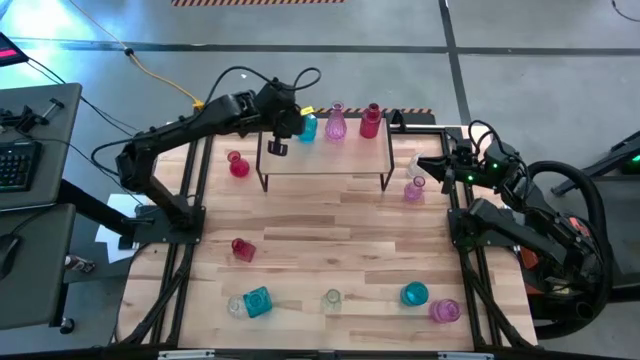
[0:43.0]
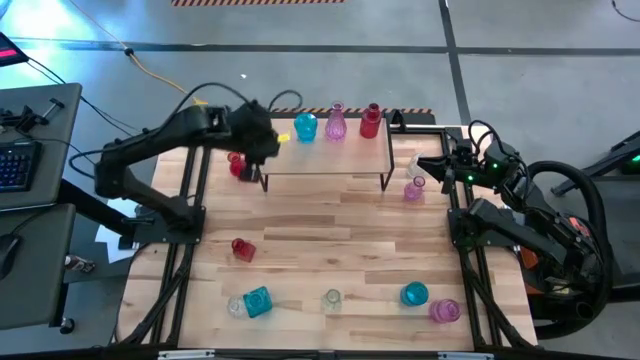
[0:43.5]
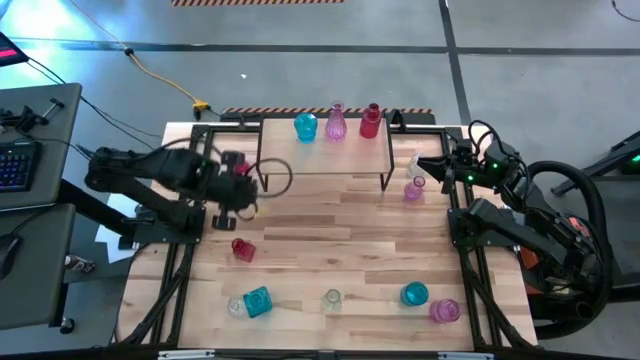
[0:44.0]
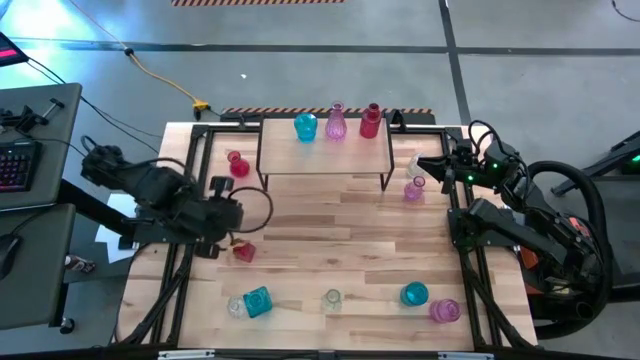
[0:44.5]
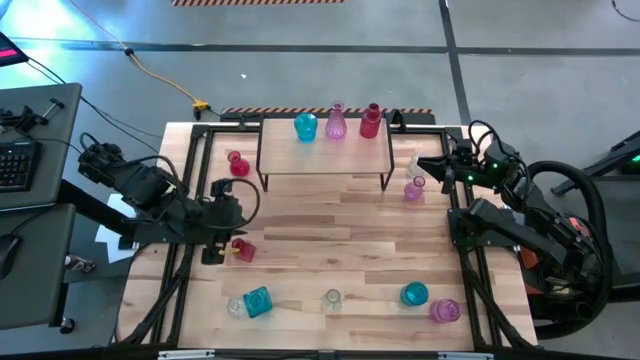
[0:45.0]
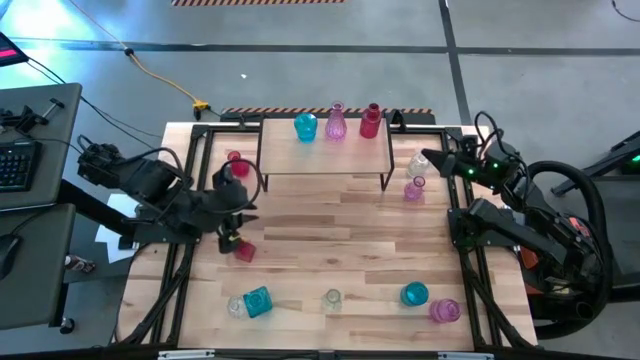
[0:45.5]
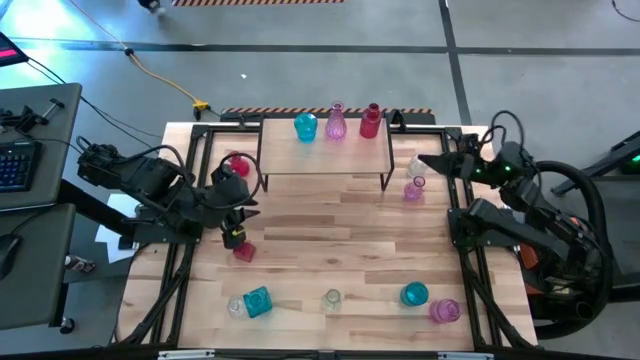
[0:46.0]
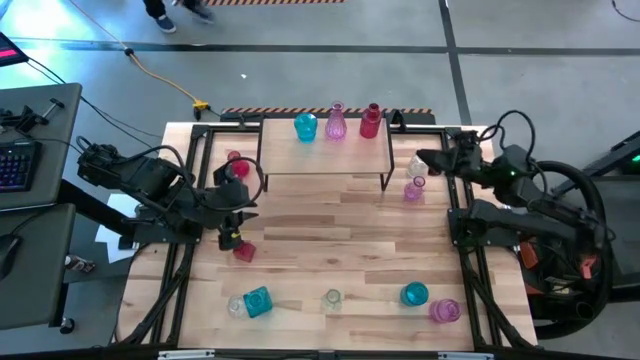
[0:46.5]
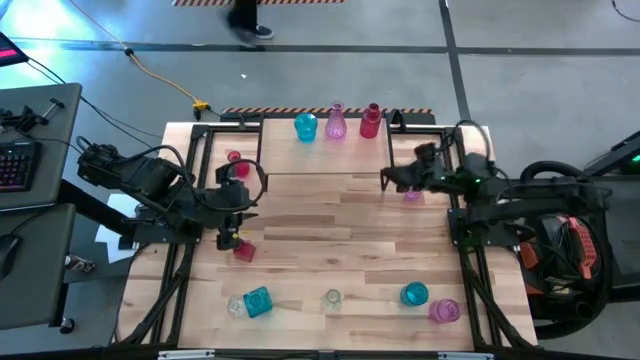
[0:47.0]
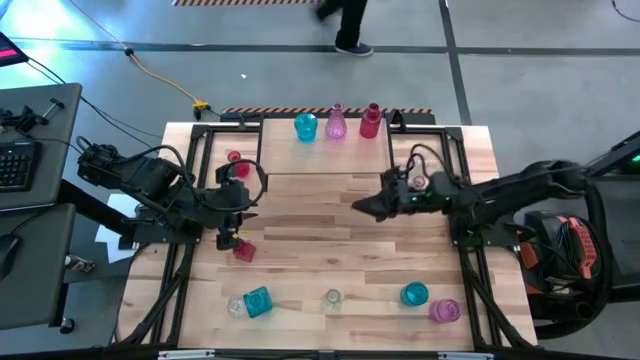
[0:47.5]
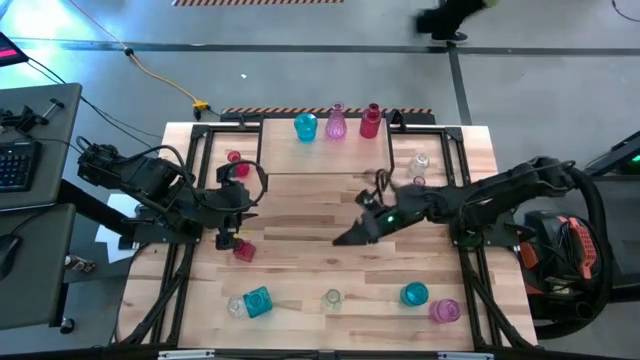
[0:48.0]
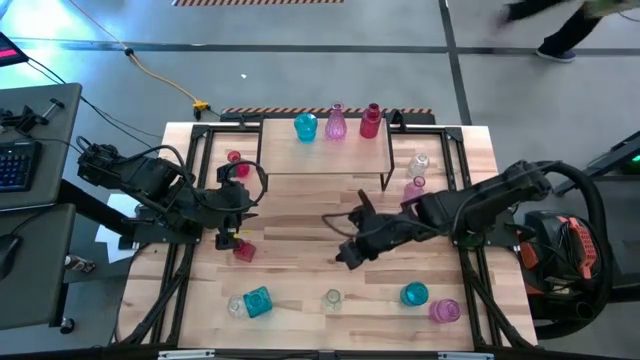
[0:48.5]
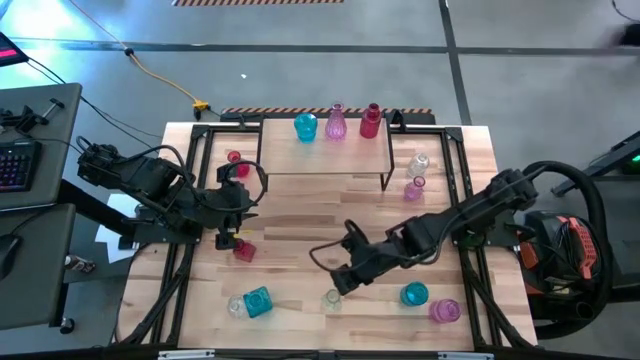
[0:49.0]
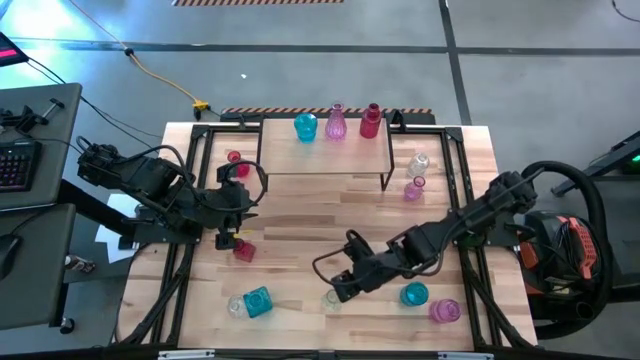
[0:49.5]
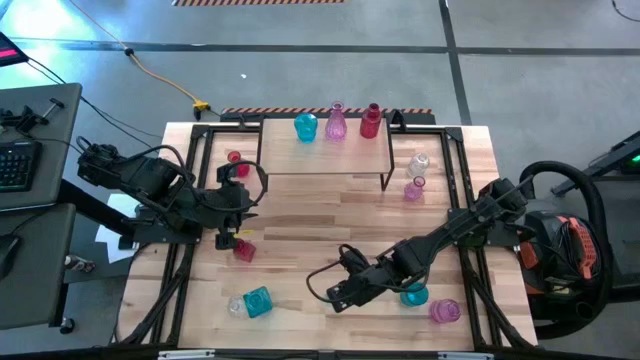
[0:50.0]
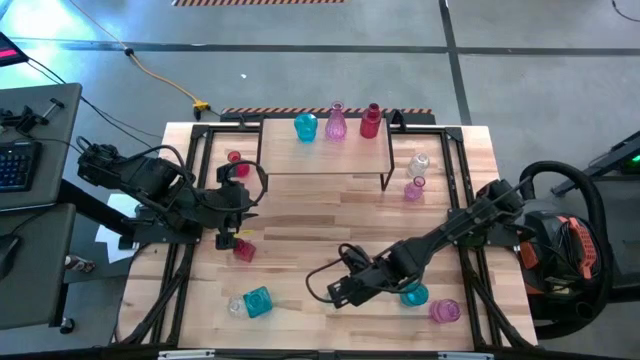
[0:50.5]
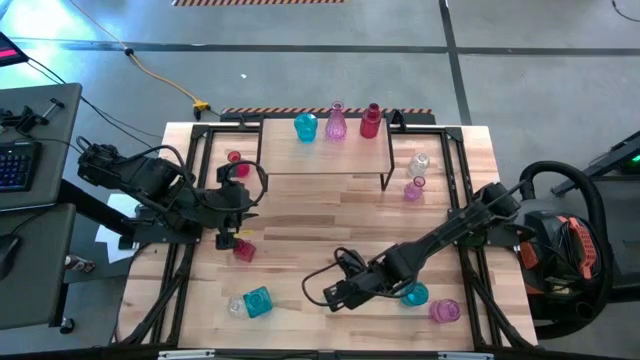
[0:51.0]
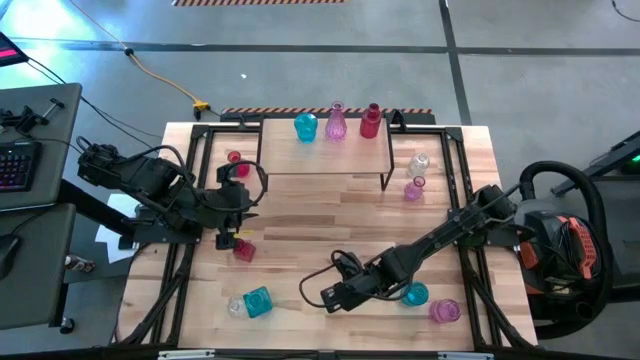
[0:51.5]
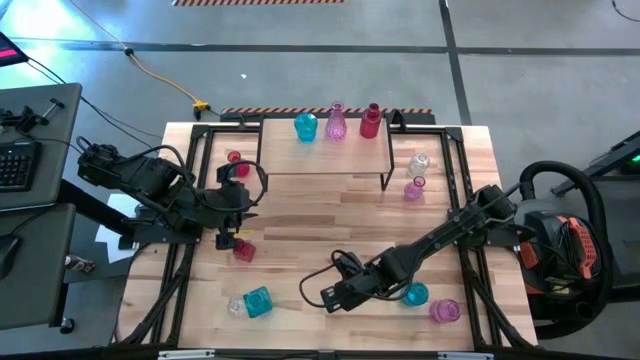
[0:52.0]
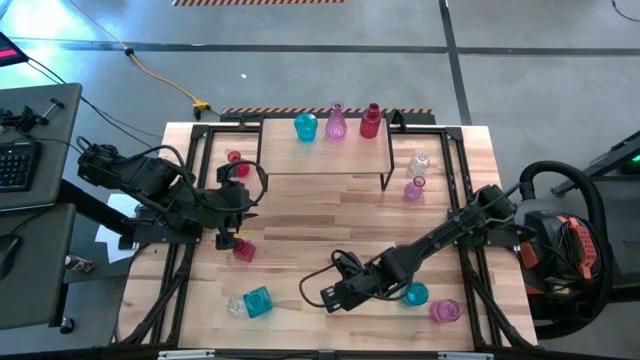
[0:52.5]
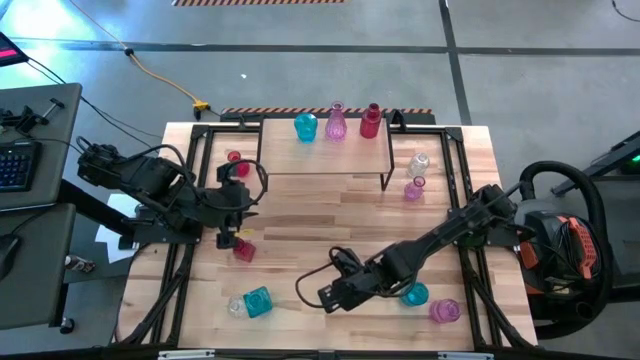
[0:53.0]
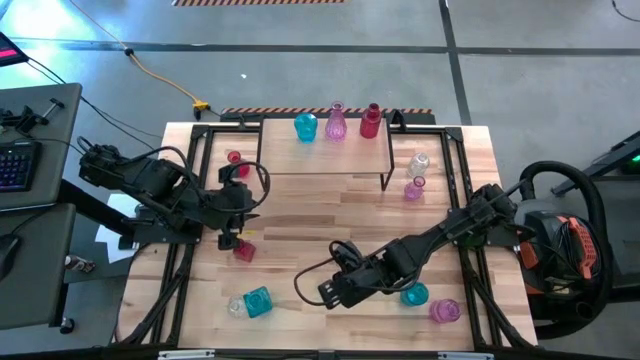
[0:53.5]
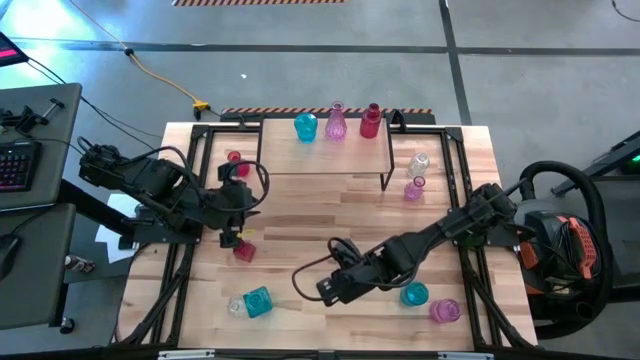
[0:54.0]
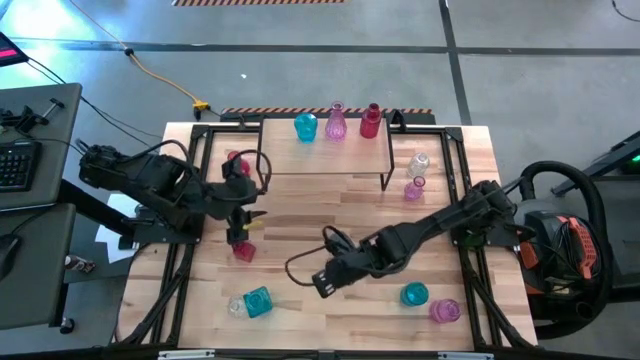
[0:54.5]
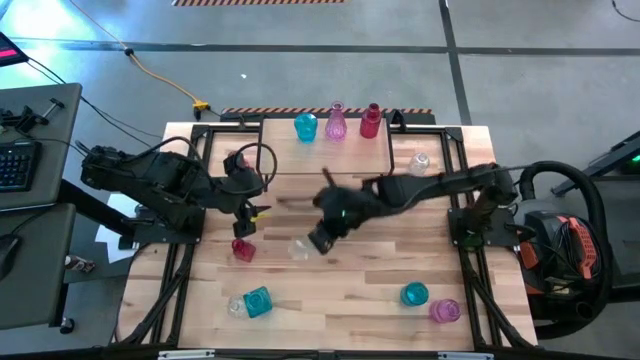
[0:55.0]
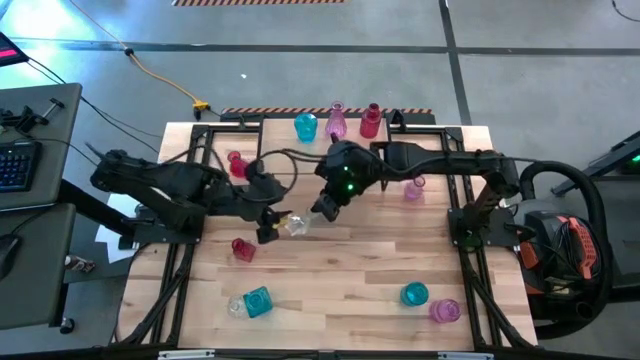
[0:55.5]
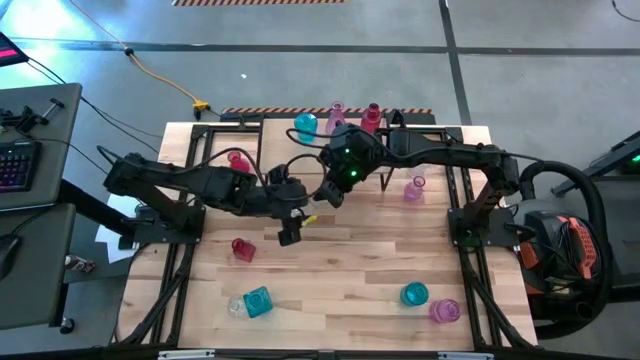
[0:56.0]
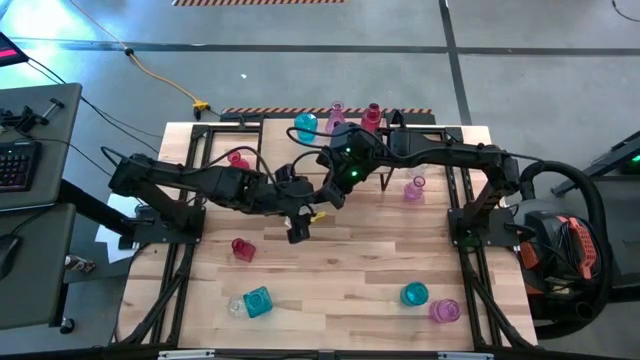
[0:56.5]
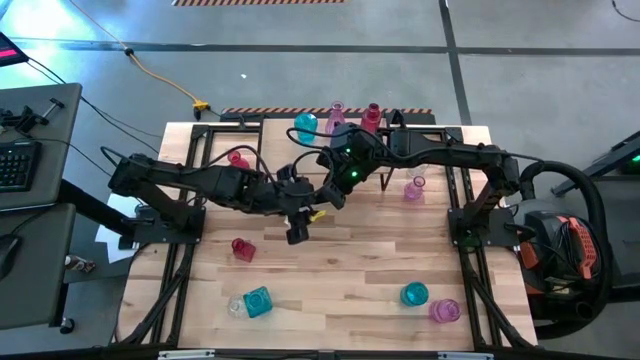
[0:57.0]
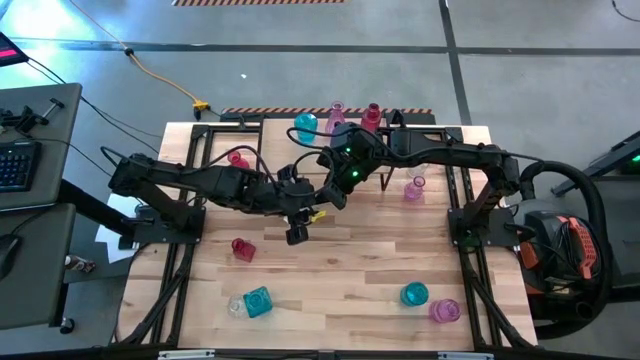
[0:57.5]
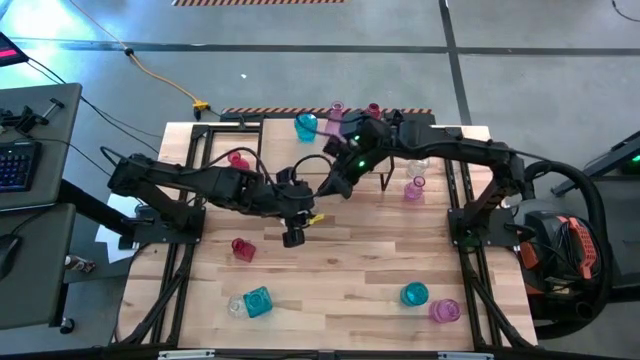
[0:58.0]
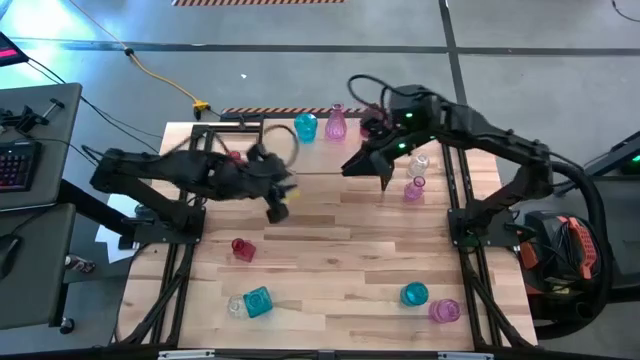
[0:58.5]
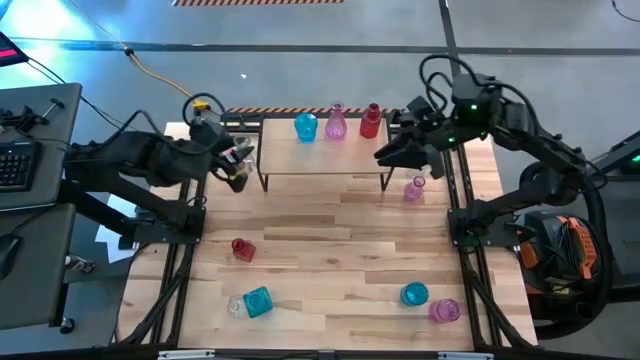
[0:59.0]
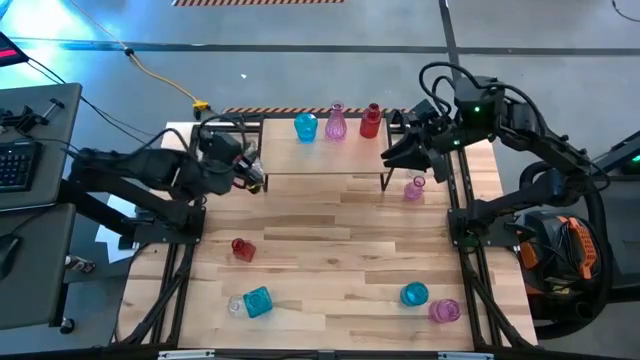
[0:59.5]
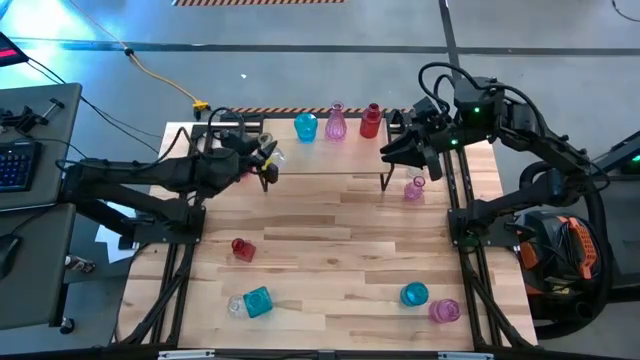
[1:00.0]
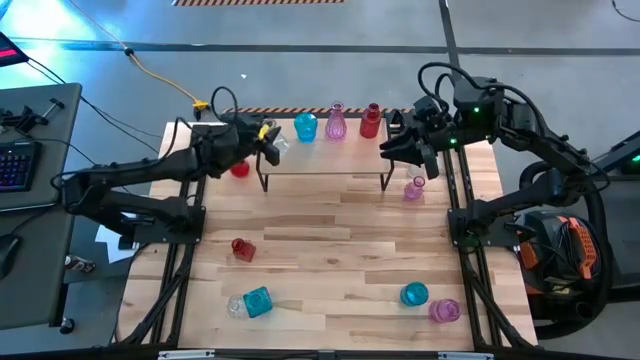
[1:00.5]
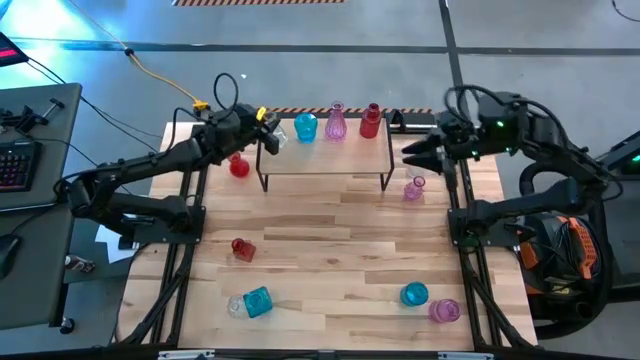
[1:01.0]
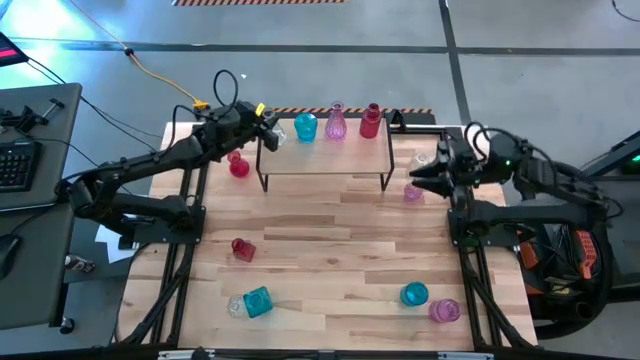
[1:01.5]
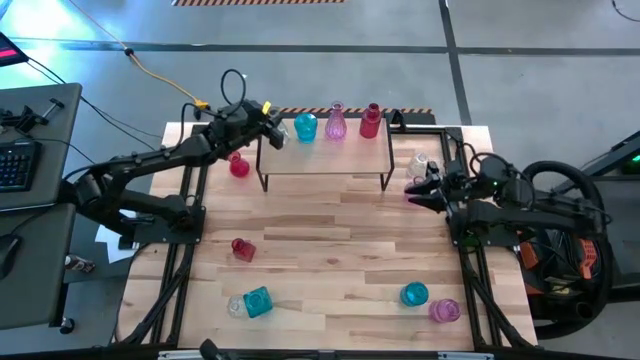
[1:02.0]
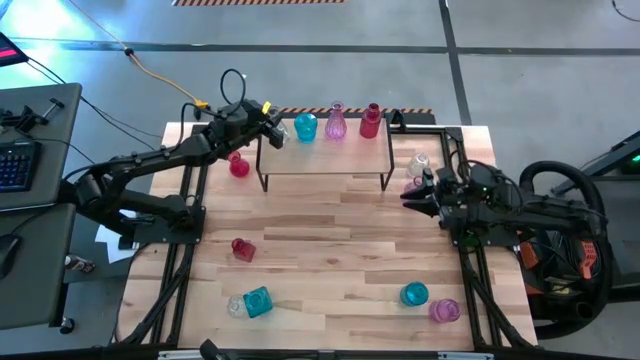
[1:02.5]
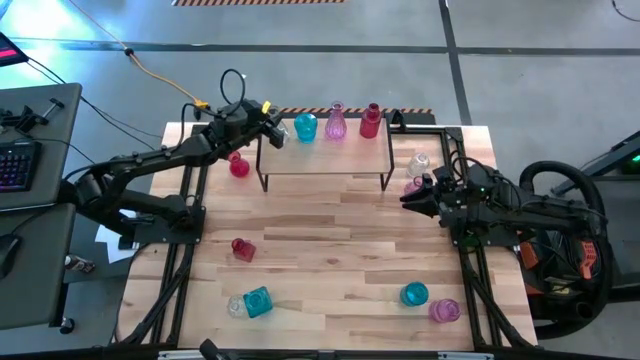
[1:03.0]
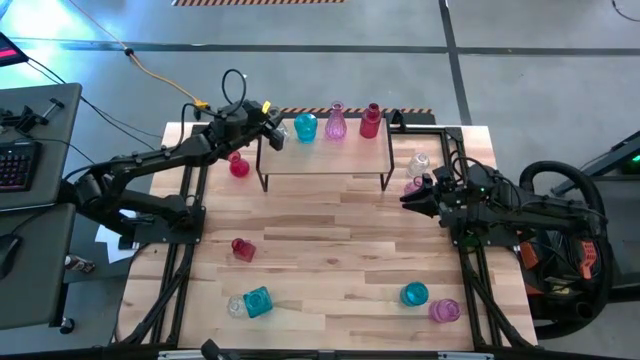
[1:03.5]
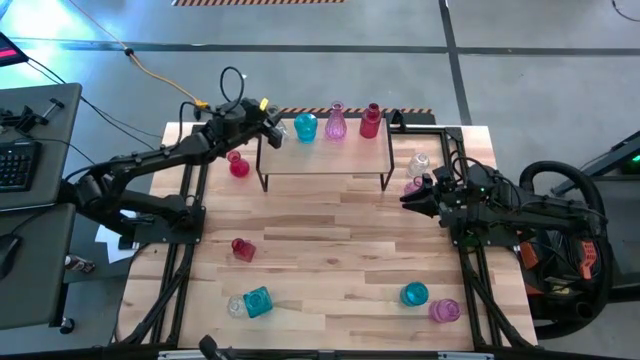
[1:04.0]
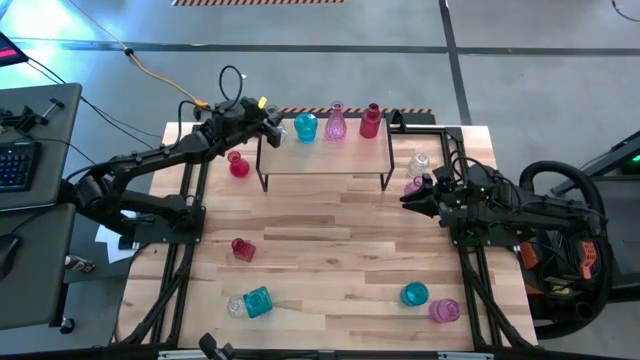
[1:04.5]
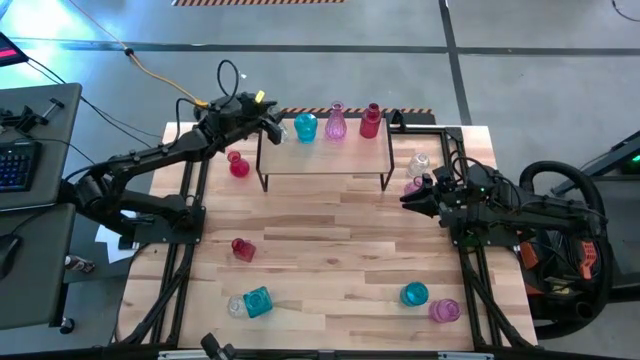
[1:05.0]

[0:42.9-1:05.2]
Task: sort vases onto shelf
Put the bottom right transparent flower vase on the shelf

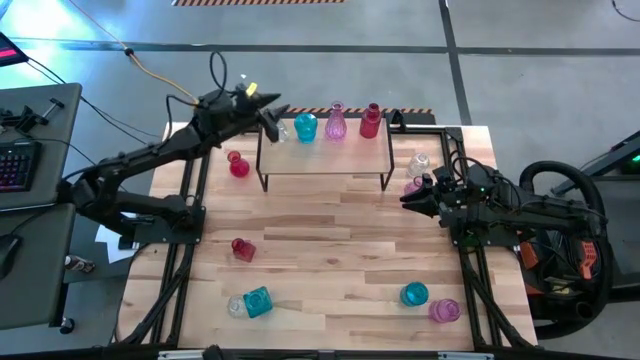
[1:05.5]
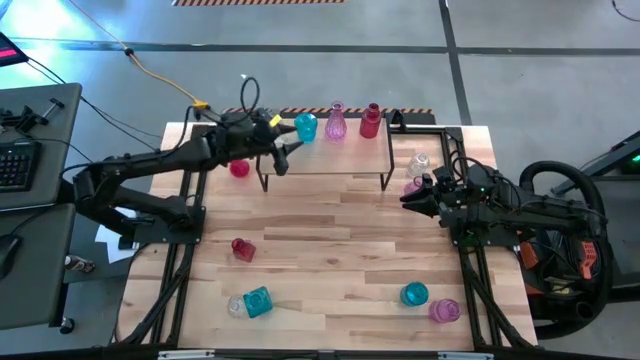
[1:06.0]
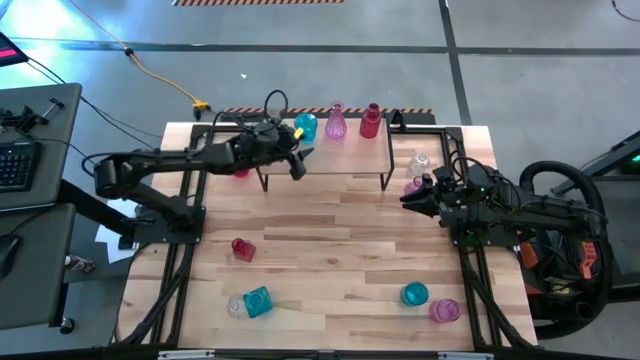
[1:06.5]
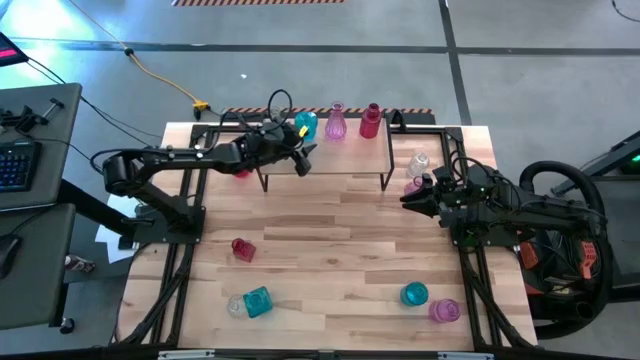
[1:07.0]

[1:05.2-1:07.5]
Adjust the blue flower vase on the shelf
